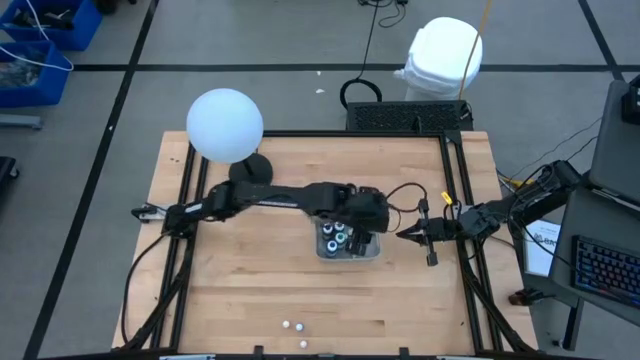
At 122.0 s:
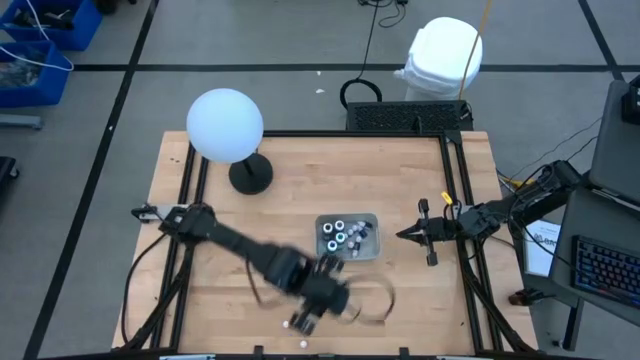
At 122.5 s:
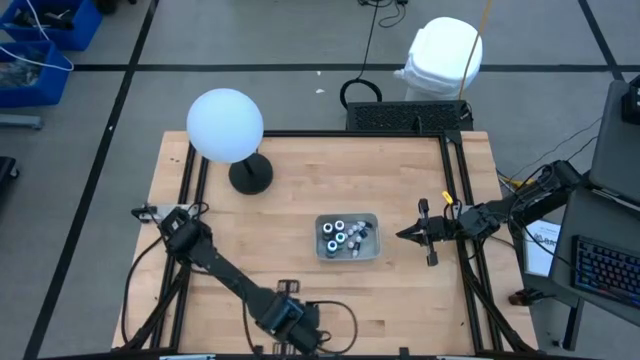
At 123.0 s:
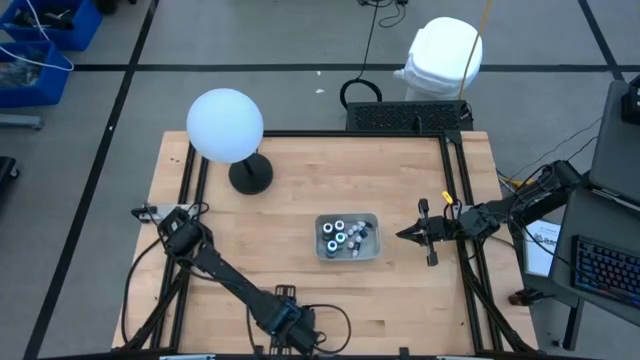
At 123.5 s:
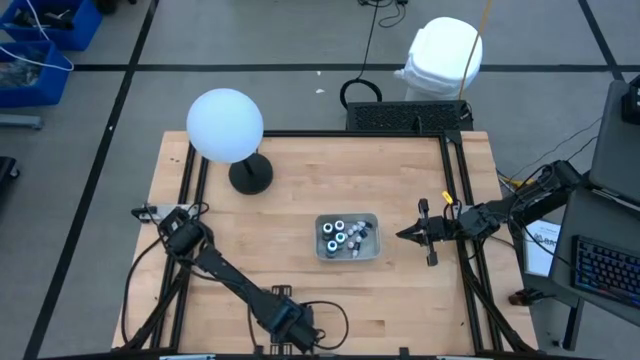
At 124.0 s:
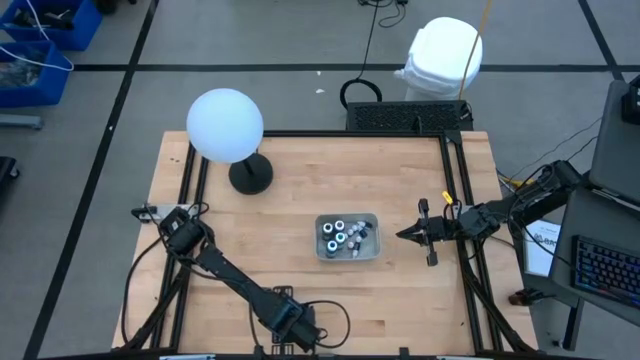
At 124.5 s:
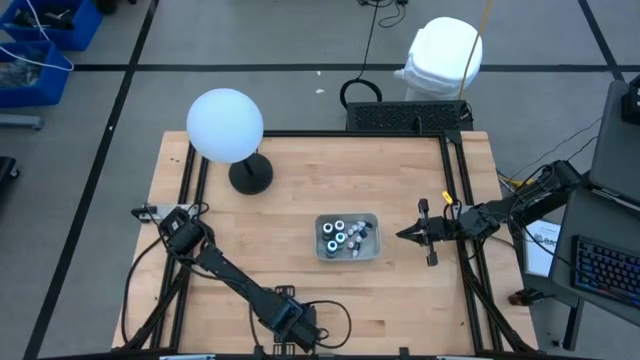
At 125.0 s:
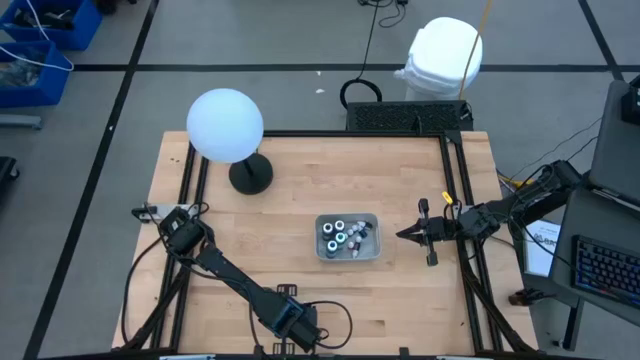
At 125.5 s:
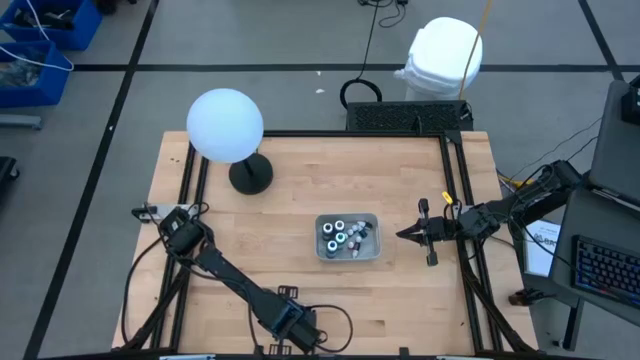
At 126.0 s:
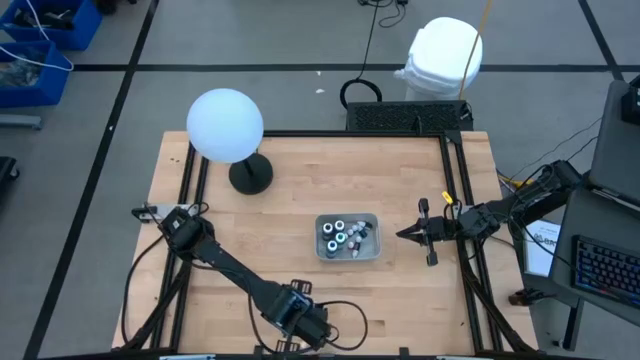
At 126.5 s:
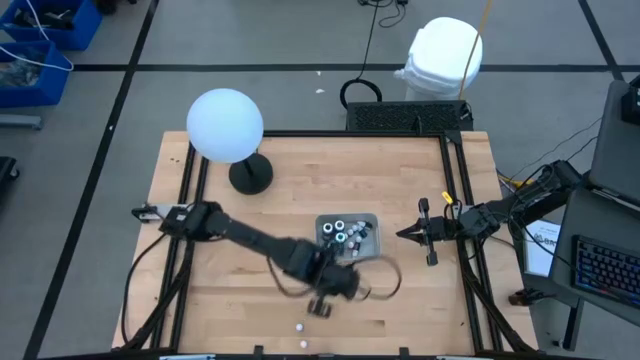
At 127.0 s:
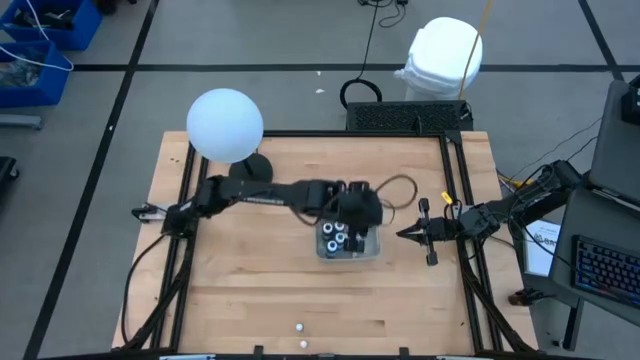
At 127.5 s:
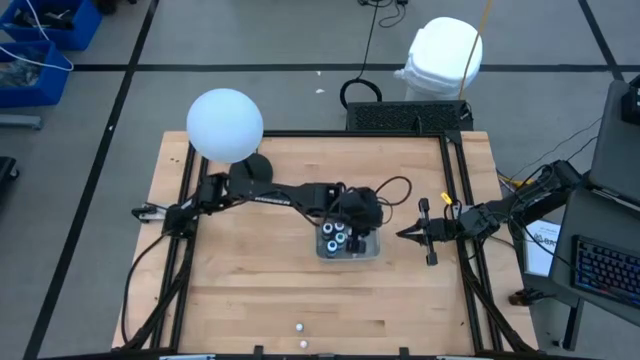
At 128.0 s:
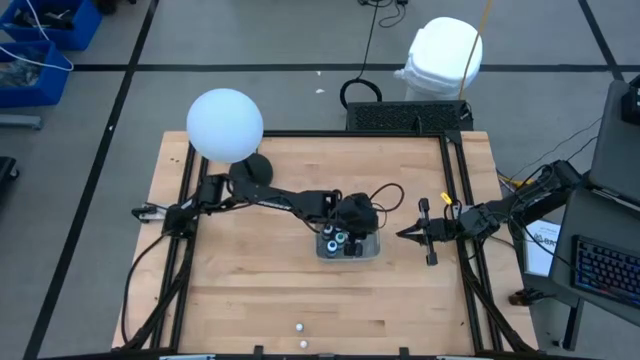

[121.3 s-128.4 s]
Task: Pick & Place food coloring
Put the small orange food coloring bottle into the gray bin

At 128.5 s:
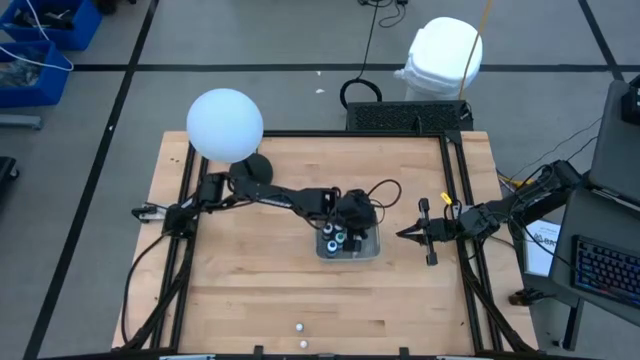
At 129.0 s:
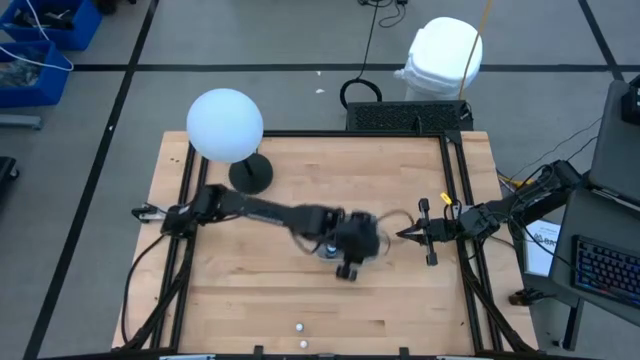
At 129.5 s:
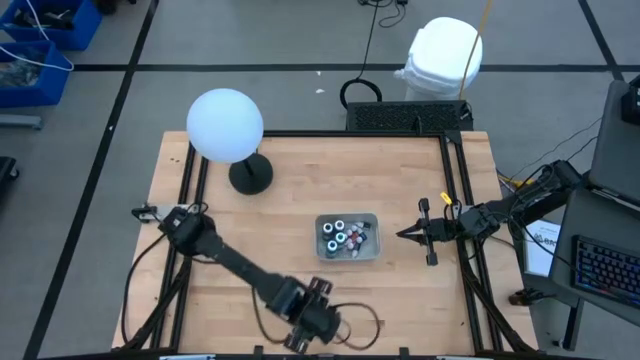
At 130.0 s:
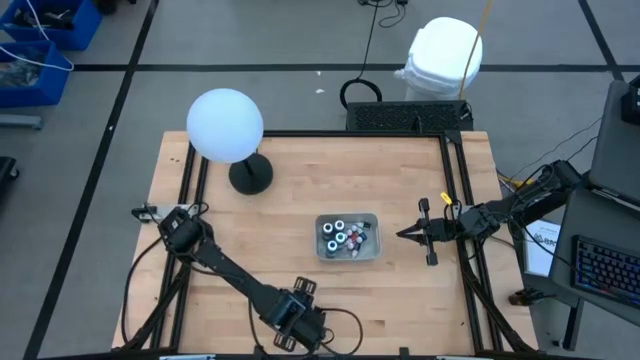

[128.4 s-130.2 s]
Put the small dark purple food coloring bottle into the gray bin

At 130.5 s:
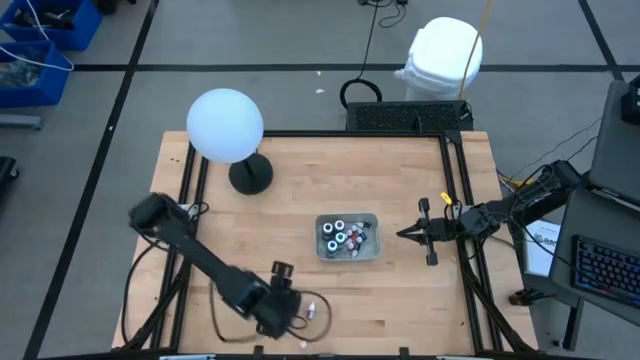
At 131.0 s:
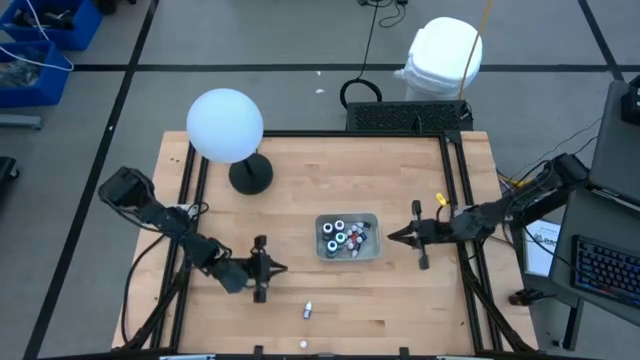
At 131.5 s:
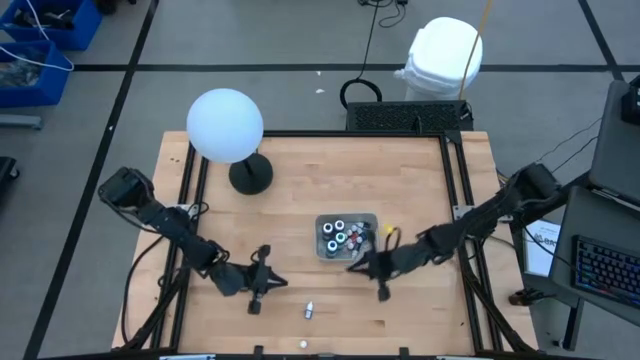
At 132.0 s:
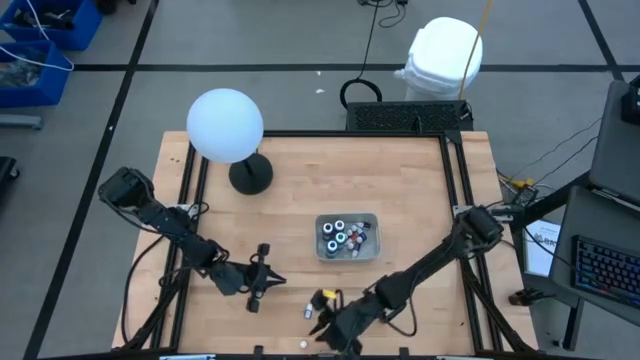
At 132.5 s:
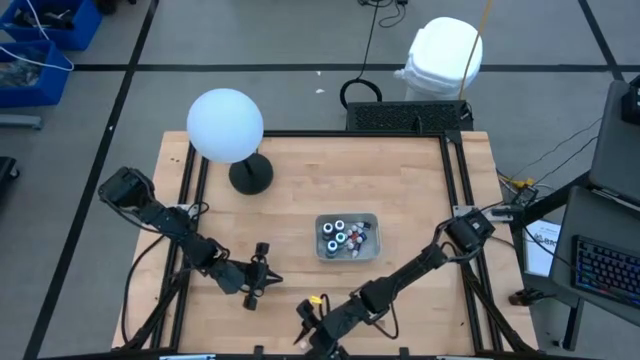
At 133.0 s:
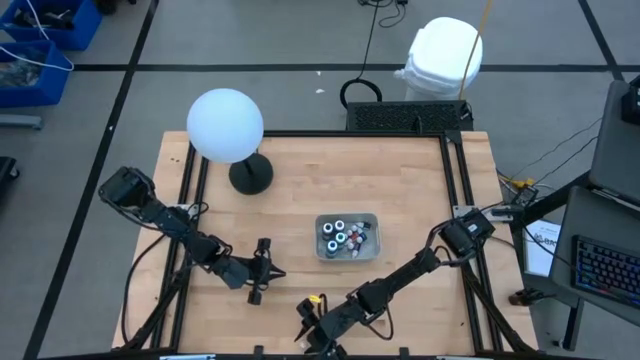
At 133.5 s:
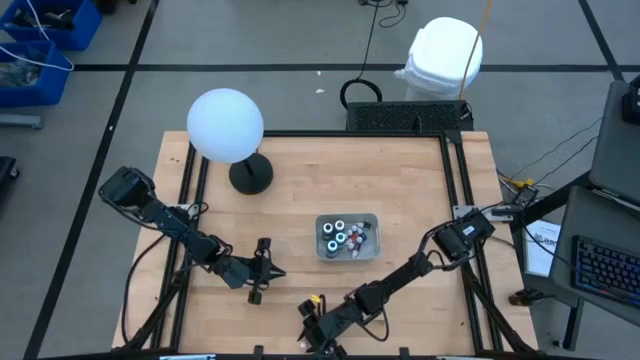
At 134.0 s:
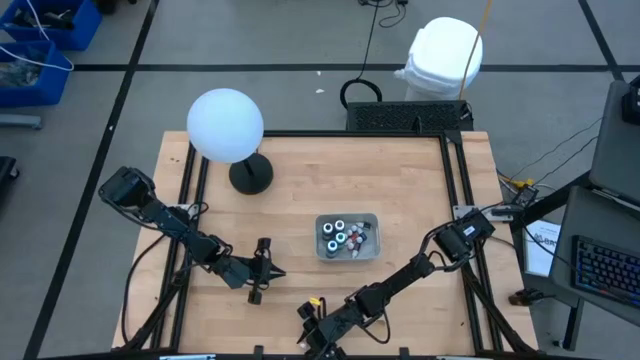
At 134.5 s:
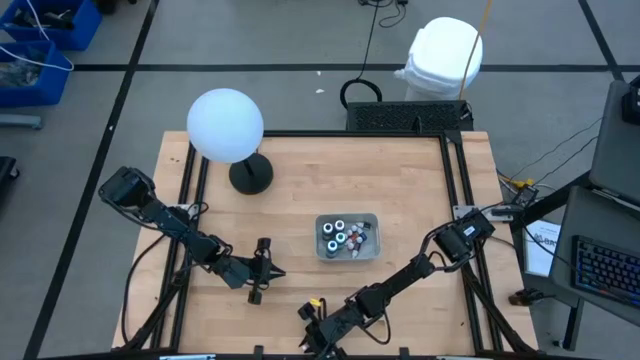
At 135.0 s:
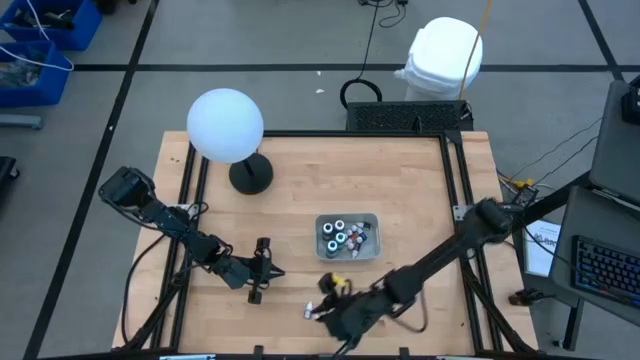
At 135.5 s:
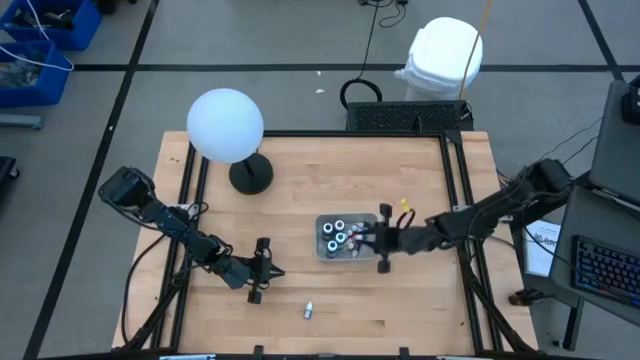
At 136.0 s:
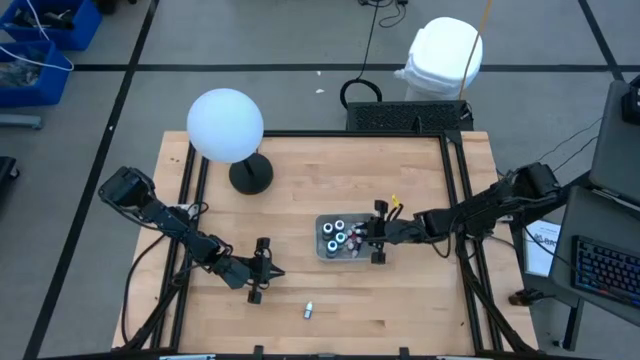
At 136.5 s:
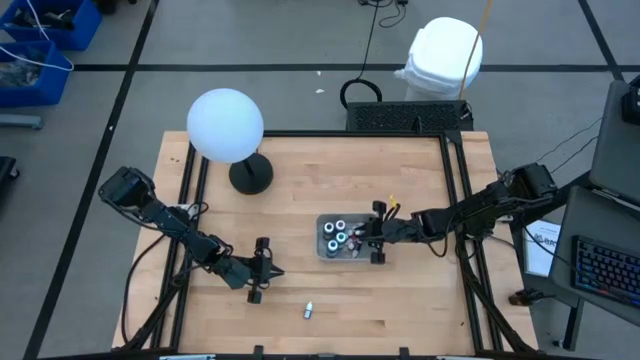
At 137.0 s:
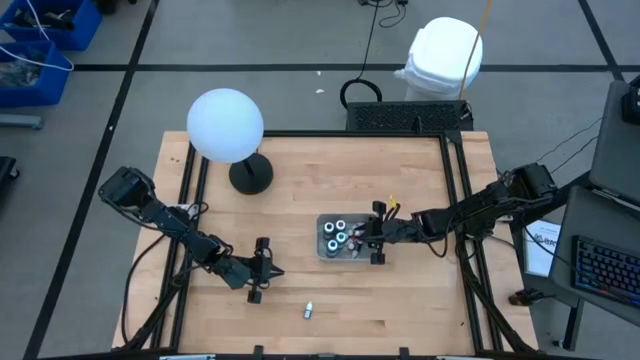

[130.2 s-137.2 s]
Put the small orange food coloring bottle into the gray bin

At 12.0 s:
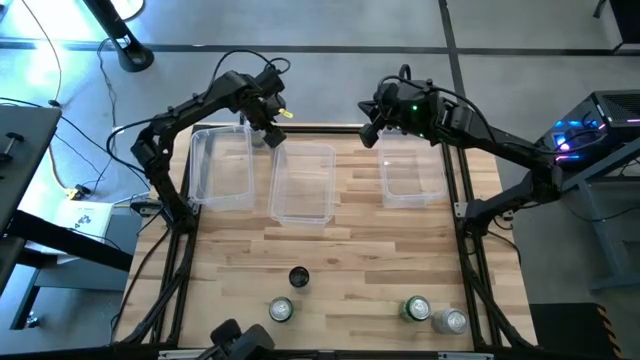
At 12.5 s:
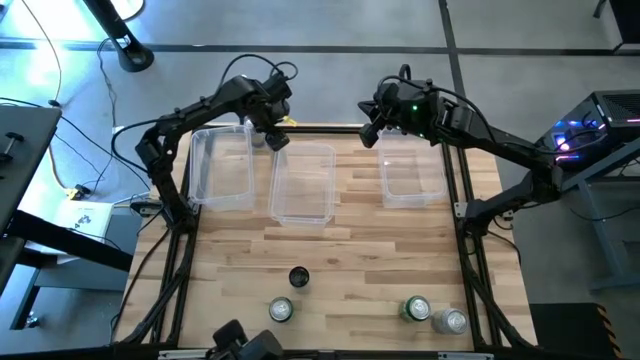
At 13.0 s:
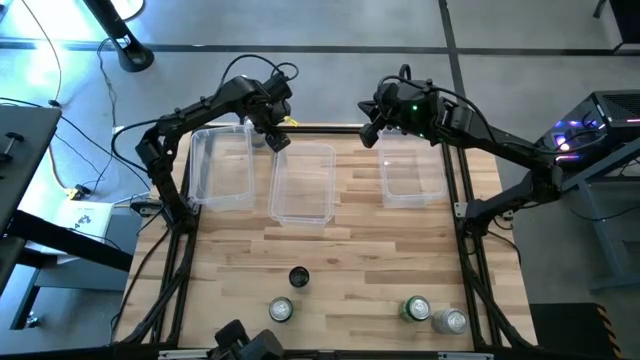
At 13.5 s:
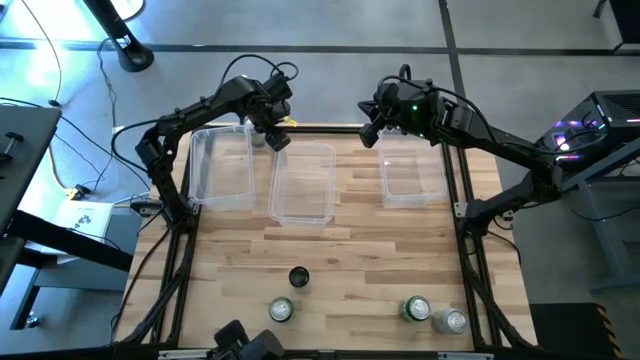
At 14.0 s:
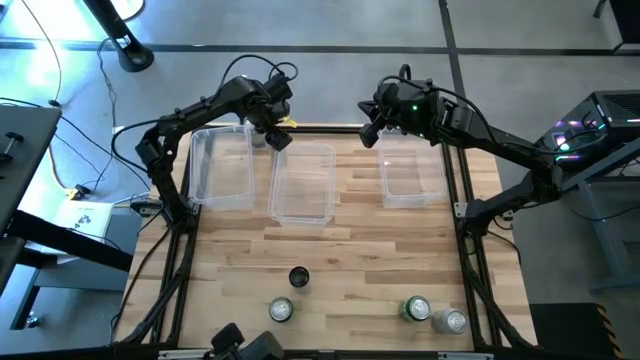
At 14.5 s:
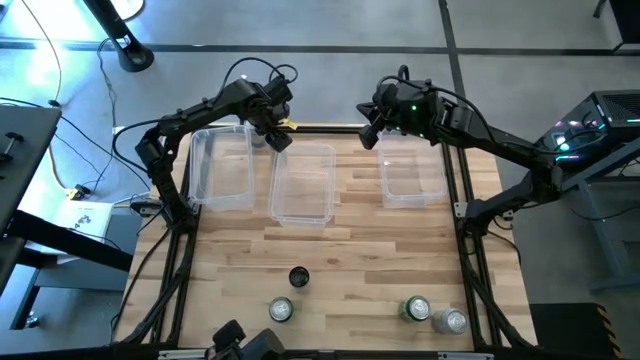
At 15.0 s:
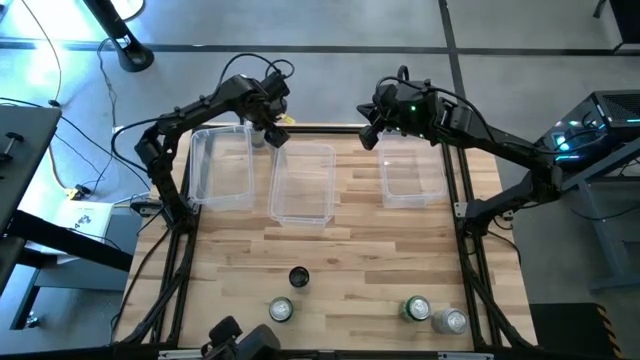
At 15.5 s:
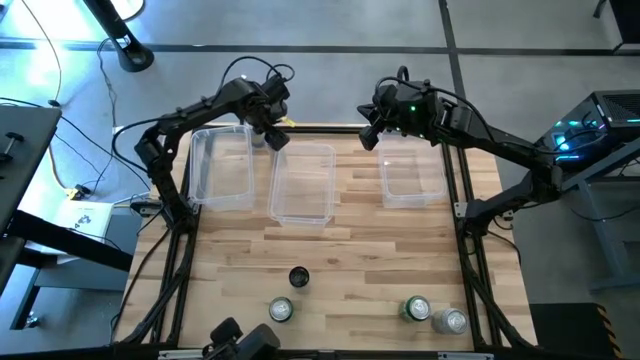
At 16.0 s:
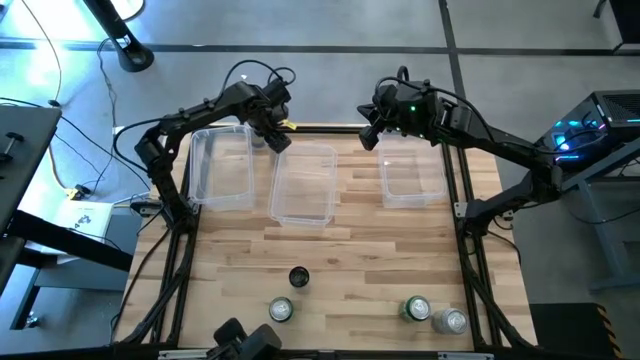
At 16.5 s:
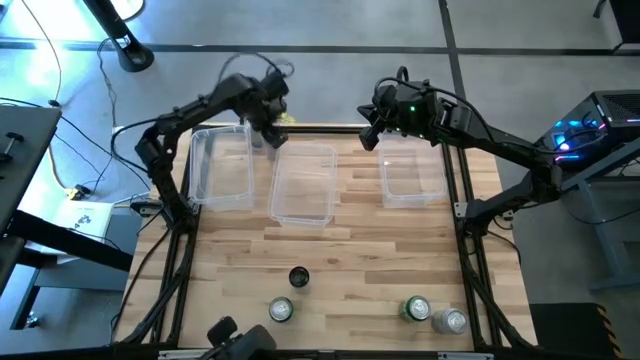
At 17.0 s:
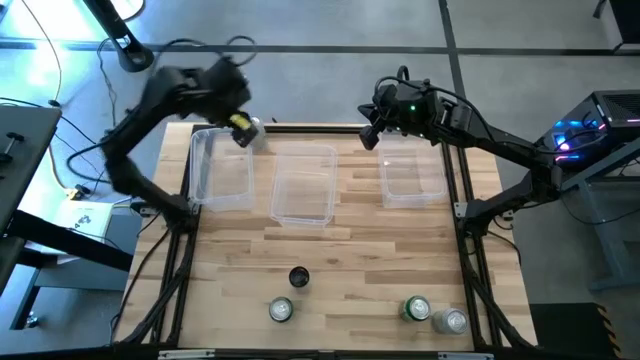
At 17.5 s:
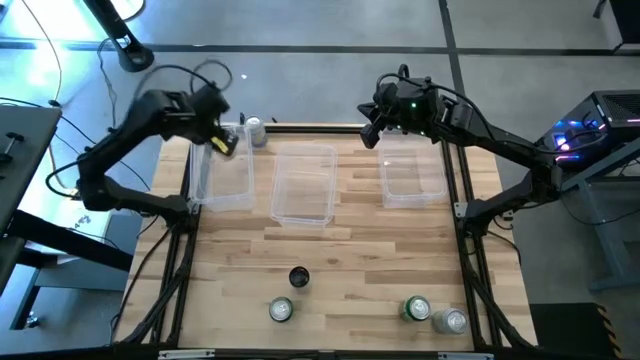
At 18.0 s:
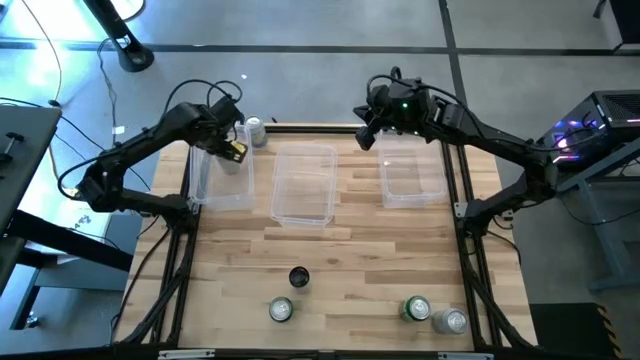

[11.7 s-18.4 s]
Task: Sort soda cans
Put the top white yellow soda can into the left transparent bin
